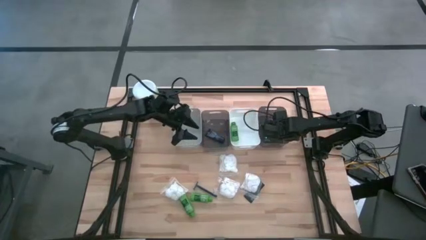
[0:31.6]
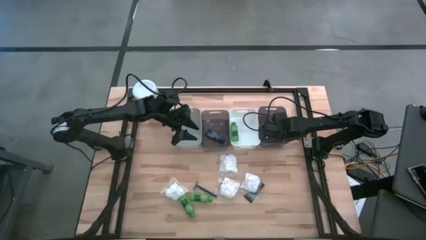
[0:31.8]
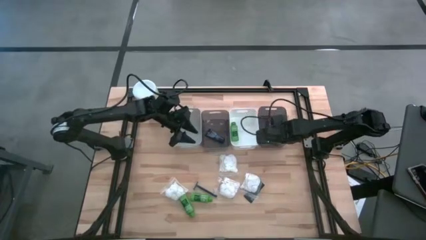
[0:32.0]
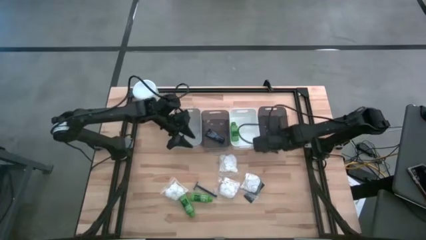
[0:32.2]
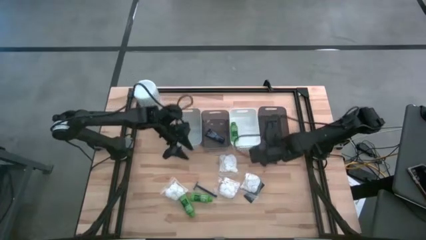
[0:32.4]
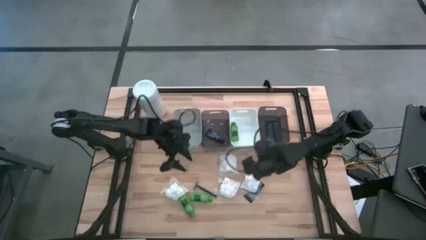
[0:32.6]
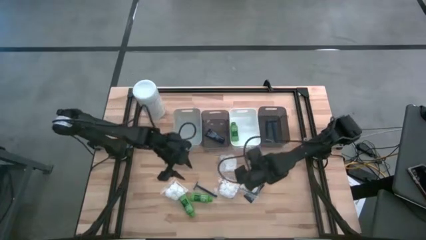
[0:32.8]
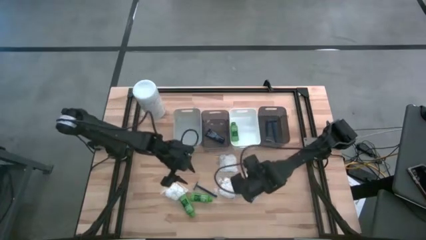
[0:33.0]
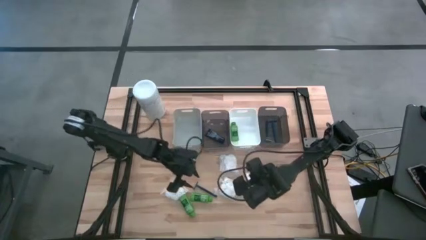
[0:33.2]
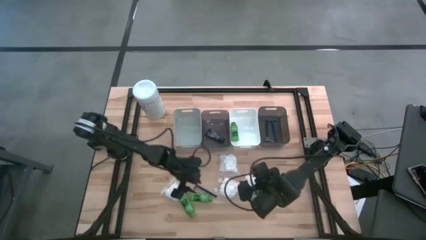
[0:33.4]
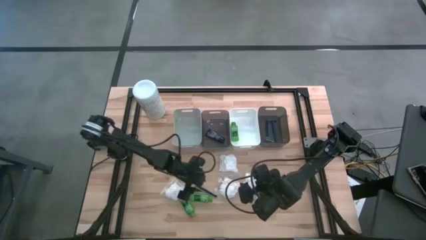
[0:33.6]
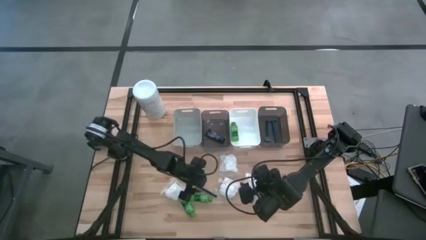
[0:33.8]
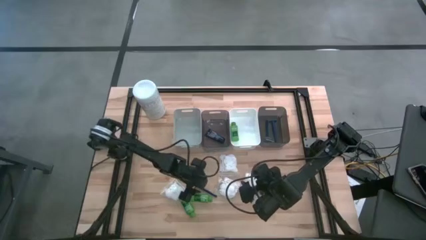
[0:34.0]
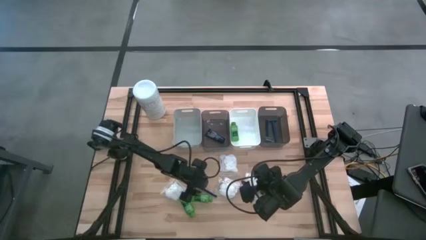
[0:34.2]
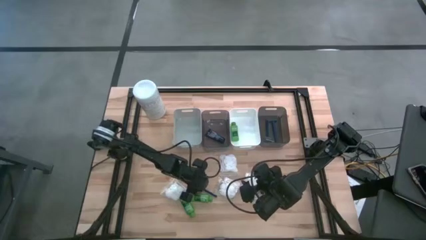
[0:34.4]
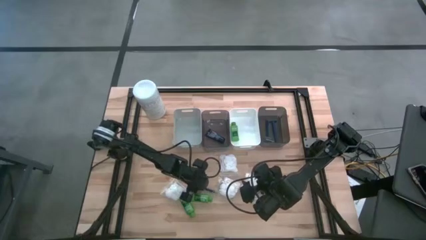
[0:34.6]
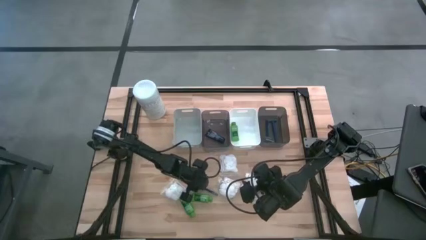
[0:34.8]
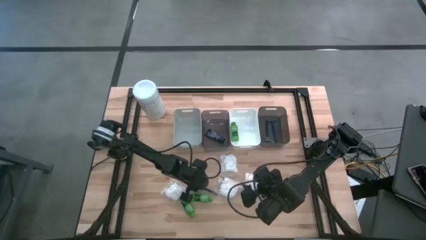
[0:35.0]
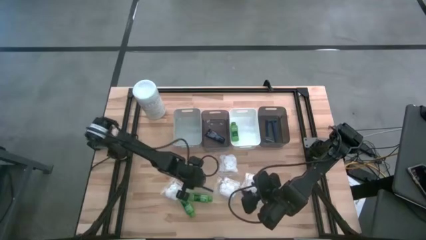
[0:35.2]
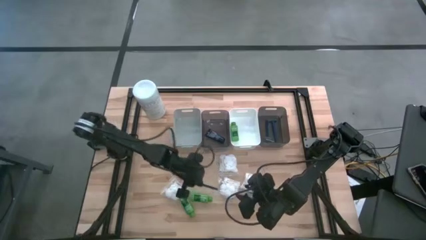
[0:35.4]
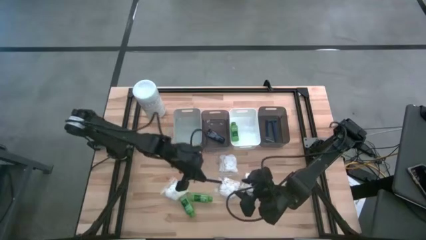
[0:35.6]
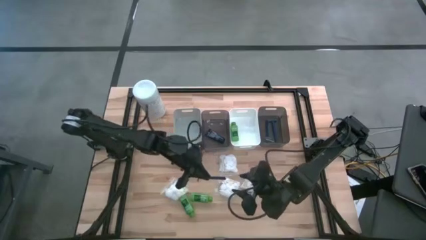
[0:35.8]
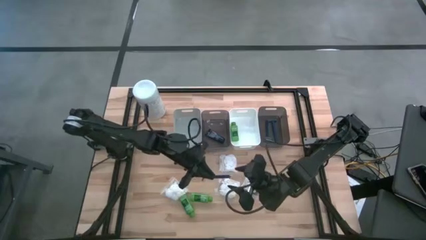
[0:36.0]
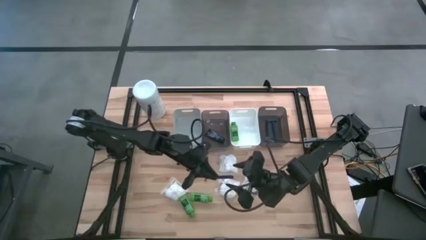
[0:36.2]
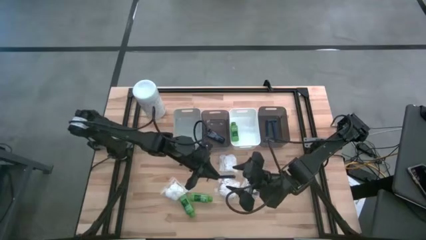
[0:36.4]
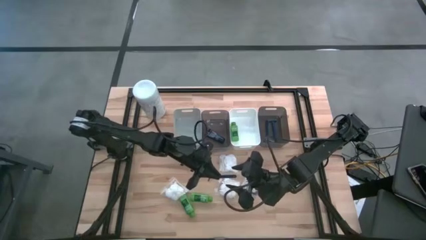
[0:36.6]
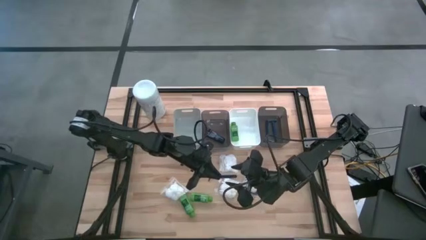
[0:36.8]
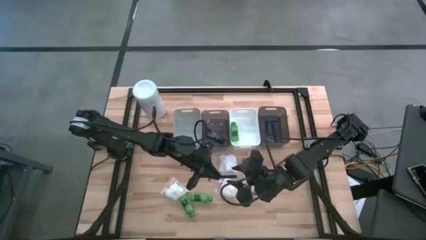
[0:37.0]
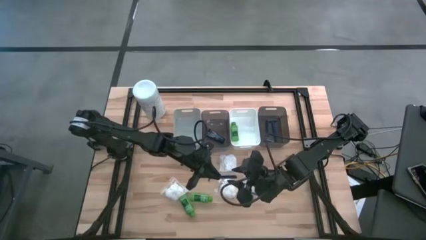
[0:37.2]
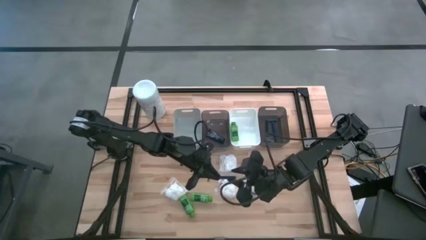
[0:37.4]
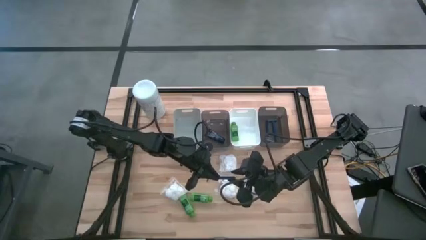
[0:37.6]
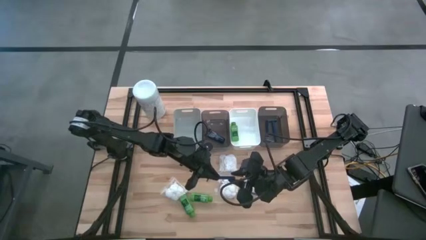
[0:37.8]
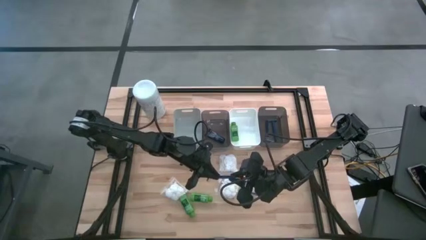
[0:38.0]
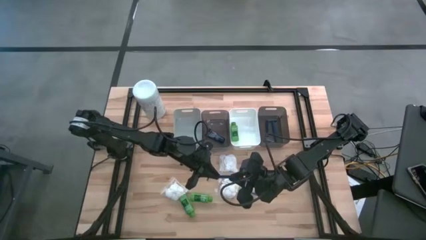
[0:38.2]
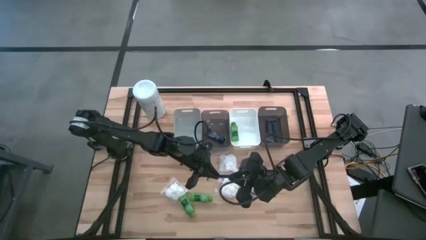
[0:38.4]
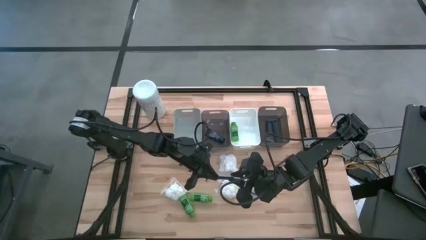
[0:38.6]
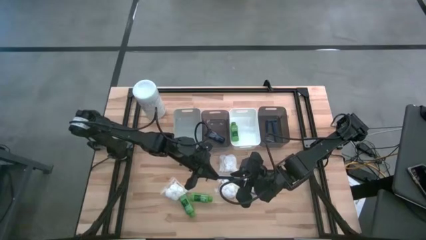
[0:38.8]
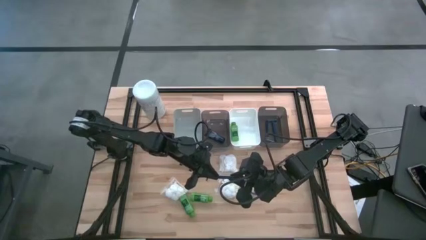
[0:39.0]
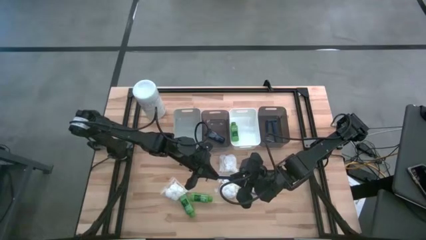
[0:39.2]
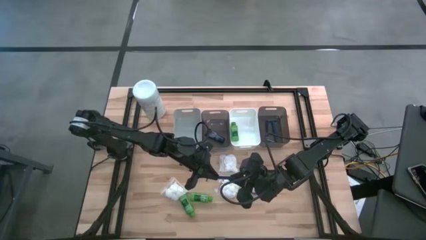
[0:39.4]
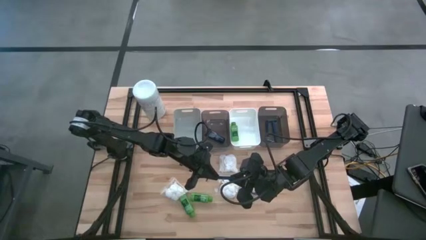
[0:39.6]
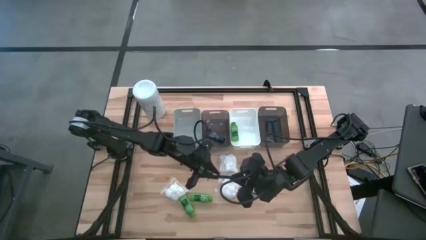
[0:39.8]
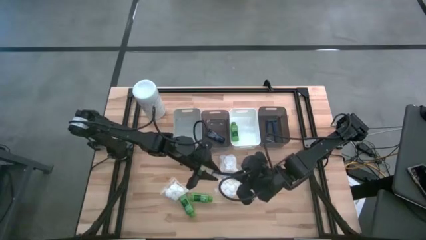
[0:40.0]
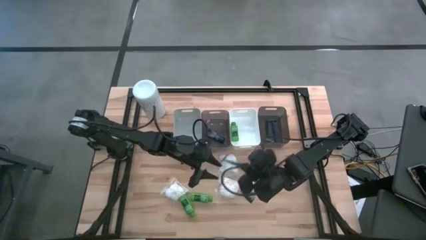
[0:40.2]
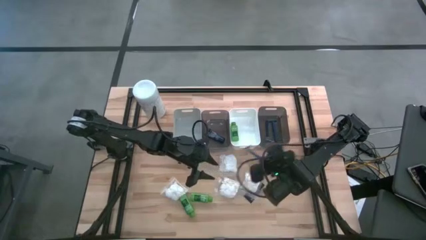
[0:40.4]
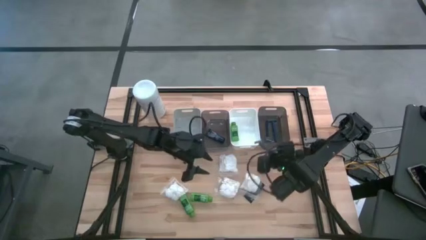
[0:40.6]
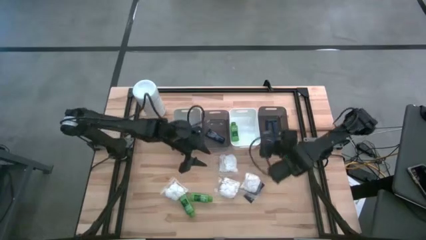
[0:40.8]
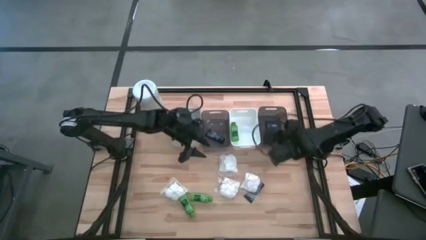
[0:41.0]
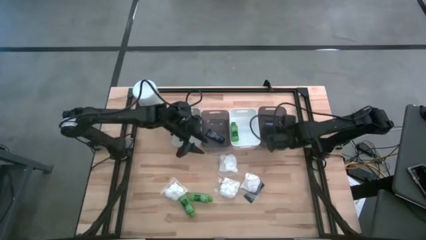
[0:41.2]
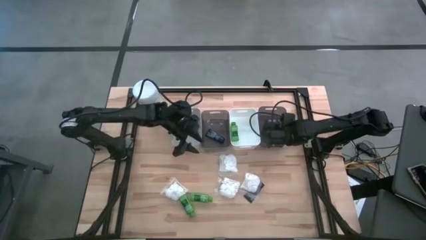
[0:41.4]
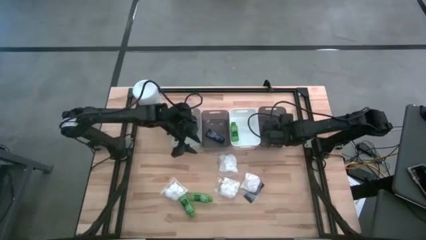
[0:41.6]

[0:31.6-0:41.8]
Task: Pick & Place Travel size toiletries
Put the blue razor into the right black bin

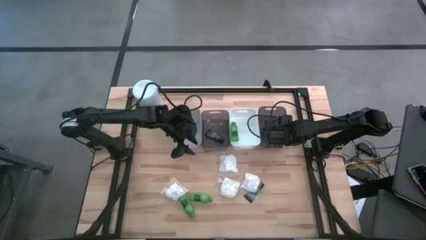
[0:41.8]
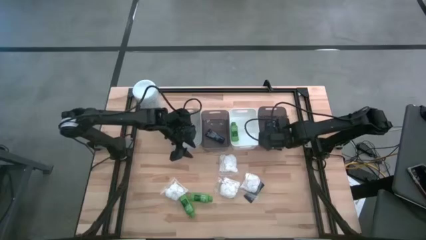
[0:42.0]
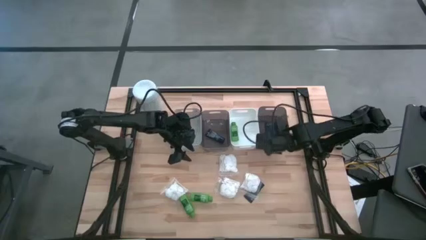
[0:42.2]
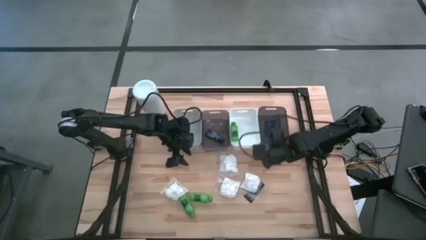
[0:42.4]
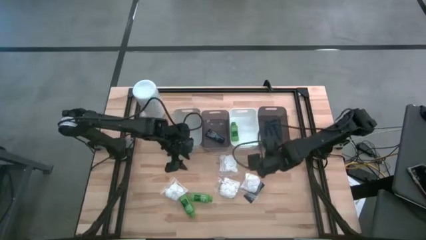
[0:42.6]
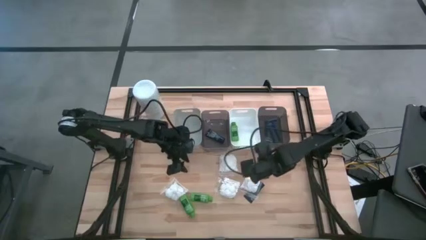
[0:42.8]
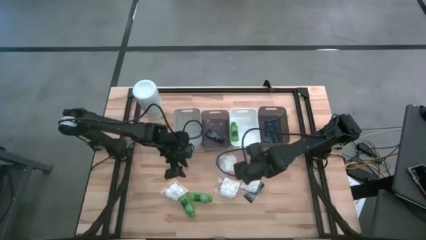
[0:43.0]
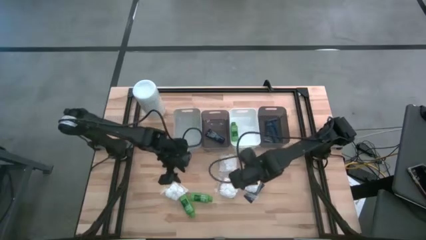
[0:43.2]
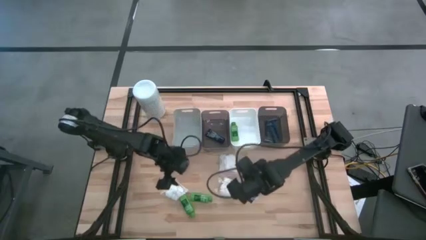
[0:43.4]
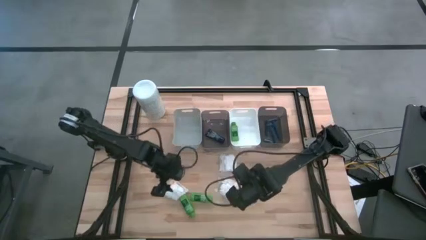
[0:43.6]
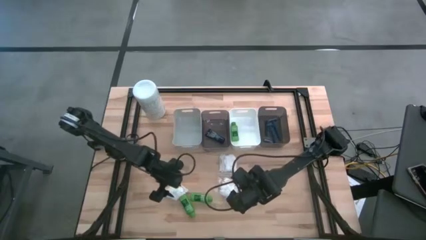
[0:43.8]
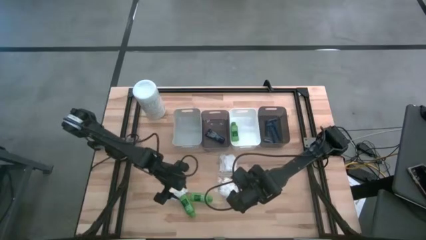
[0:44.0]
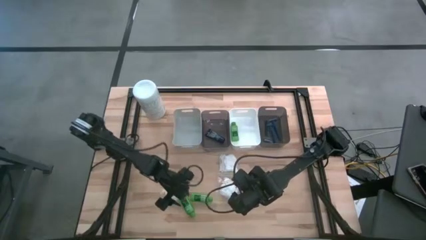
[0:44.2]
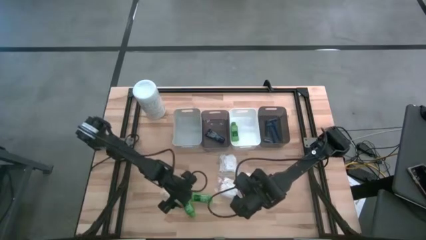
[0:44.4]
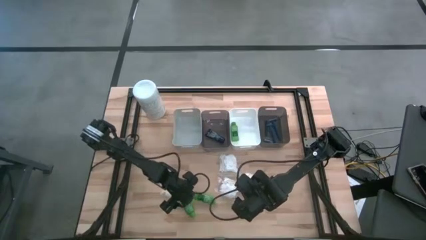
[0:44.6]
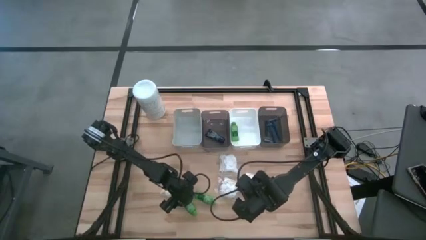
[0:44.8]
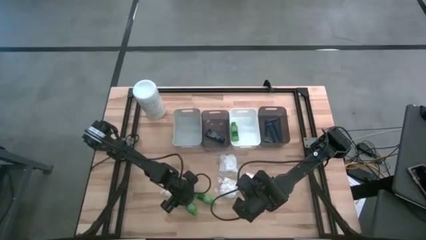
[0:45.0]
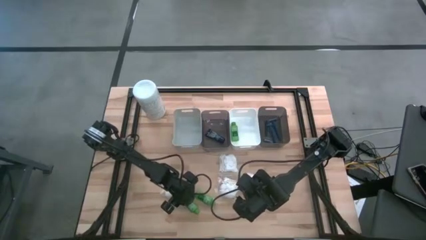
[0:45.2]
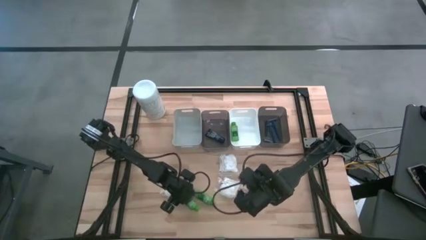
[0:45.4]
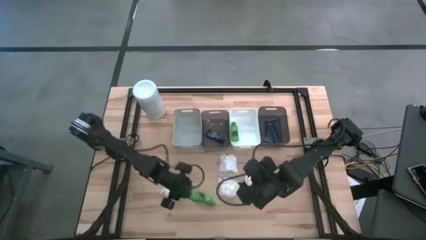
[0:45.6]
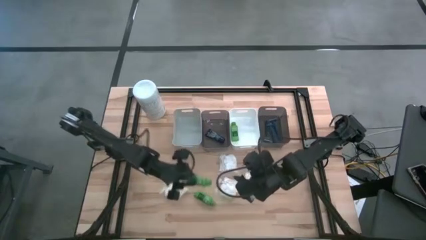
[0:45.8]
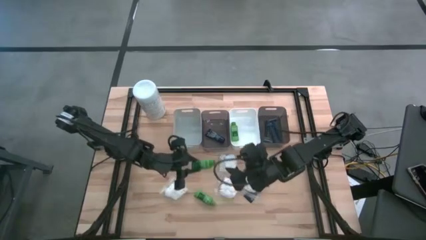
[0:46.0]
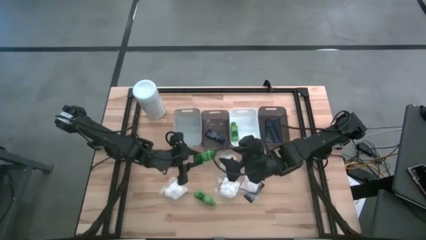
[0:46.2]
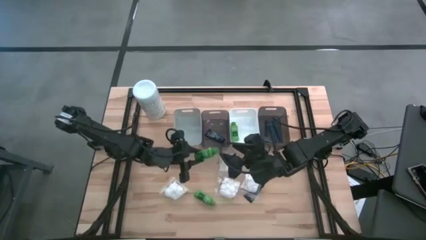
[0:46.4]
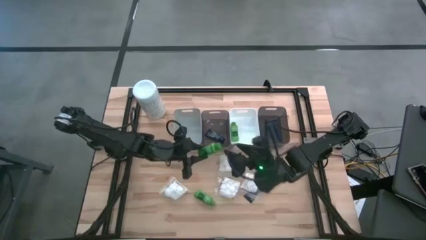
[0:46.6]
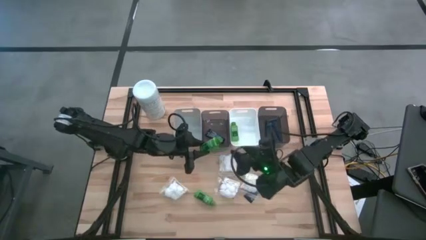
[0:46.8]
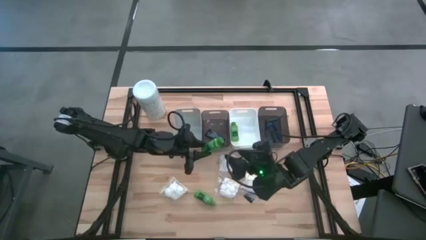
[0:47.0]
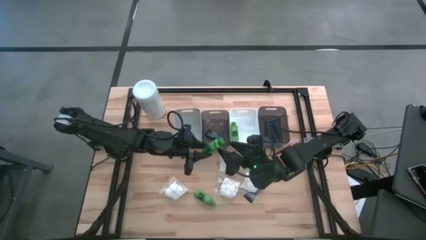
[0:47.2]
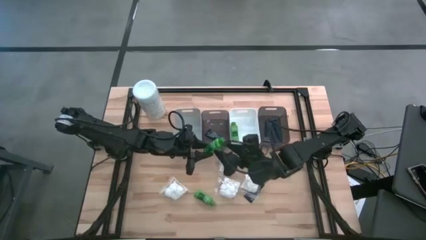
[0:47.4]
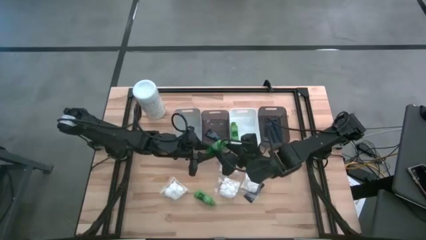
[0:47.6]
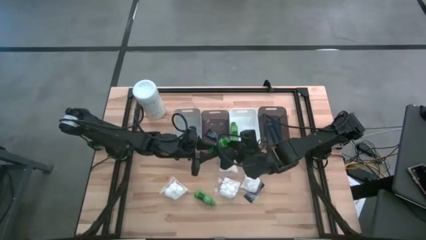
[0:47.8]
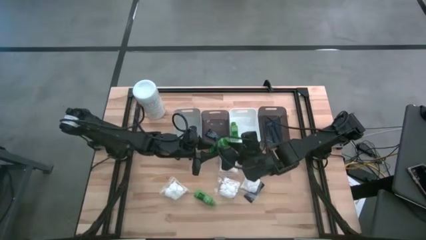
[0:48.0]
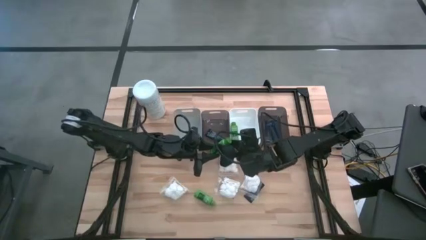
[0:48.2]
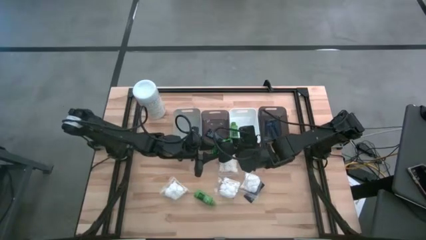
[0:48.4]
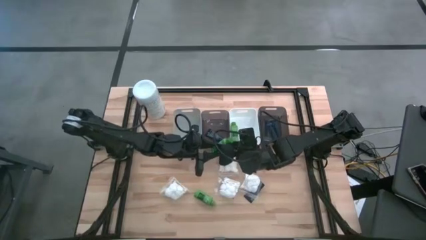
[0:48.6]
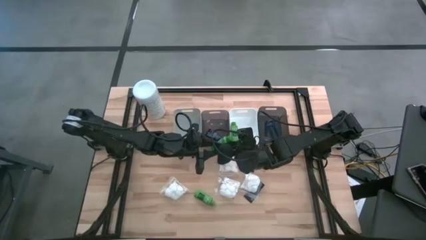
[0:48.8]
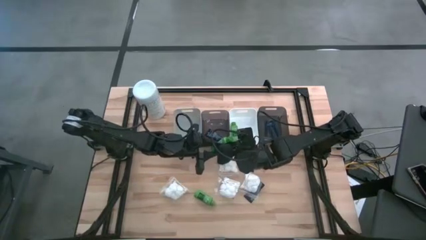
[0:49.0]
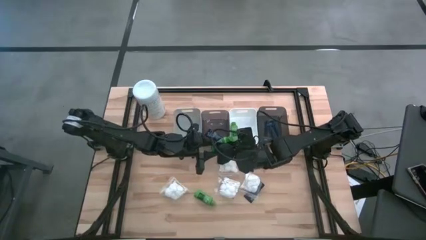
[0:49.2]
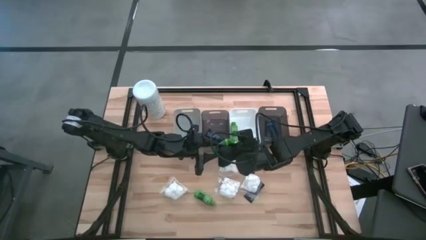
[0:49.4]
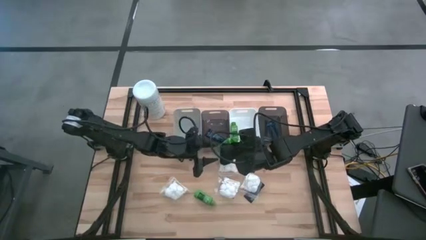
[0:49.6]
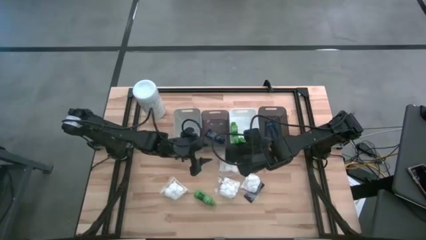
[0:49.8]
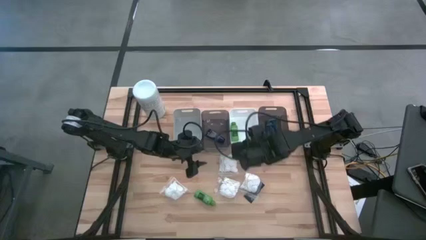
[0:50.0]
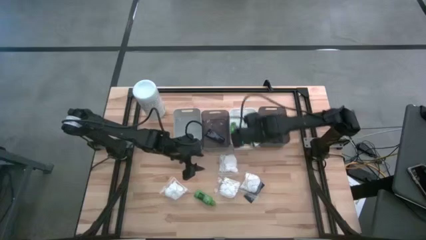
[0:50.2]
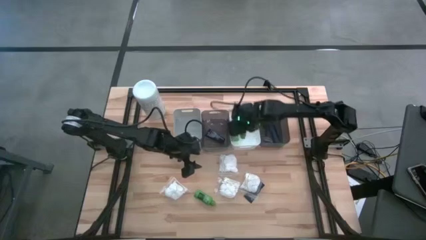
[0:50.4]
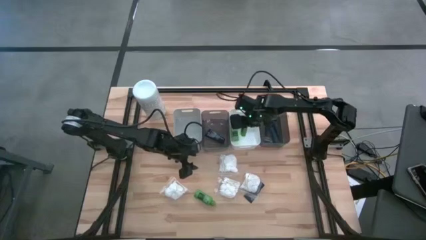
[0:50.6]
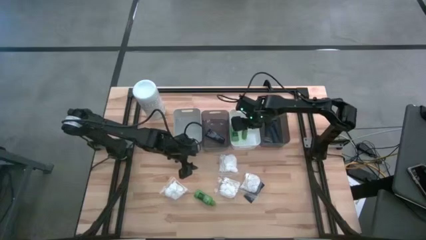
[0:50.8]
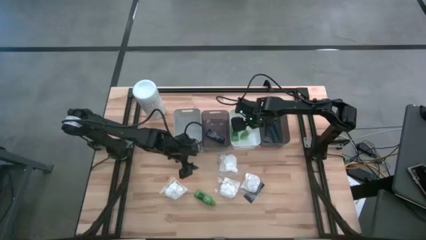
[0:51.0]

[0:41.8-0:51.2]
Put the left green shampoo into the white bin
